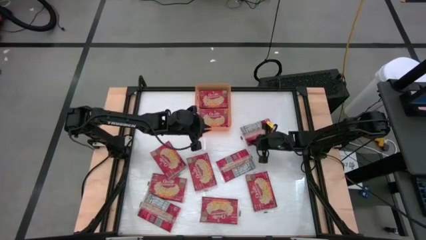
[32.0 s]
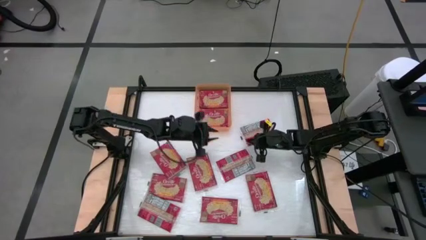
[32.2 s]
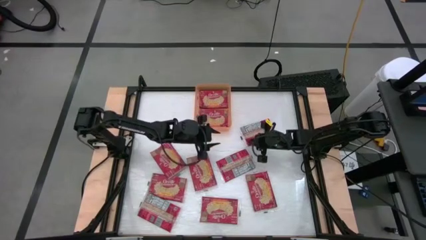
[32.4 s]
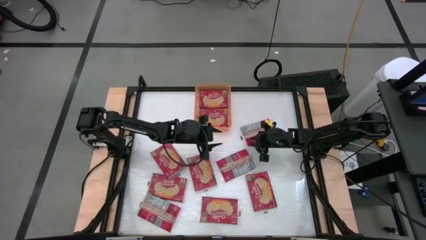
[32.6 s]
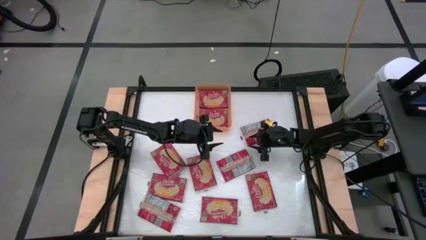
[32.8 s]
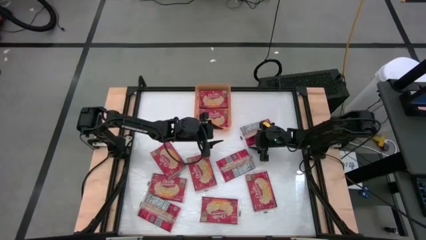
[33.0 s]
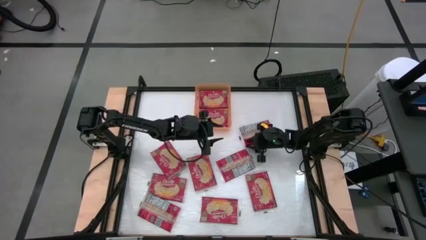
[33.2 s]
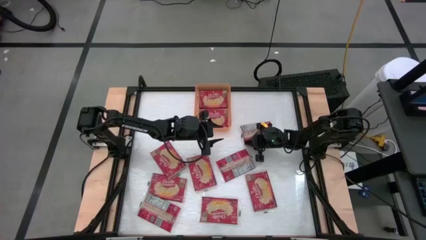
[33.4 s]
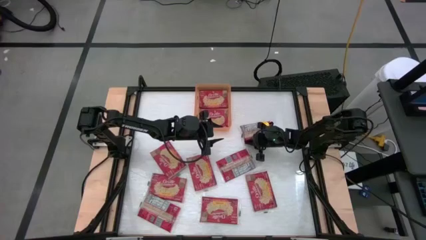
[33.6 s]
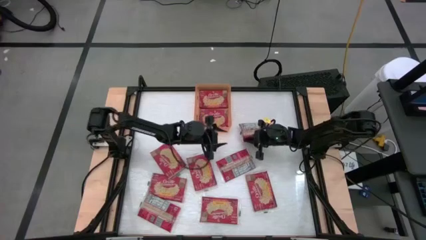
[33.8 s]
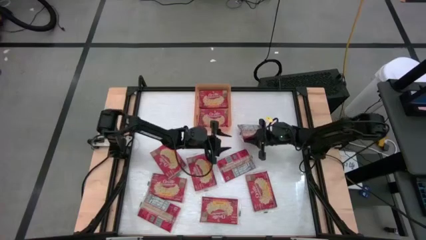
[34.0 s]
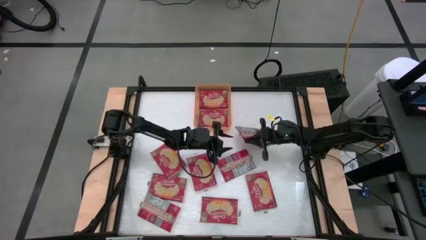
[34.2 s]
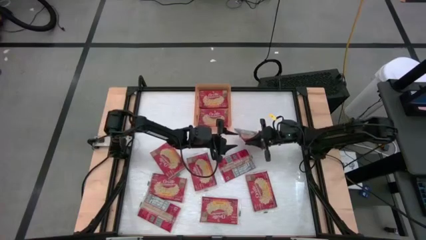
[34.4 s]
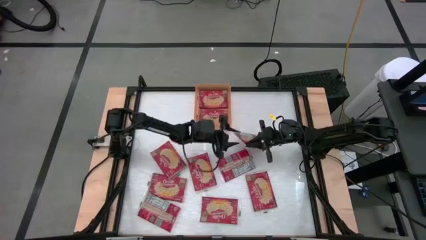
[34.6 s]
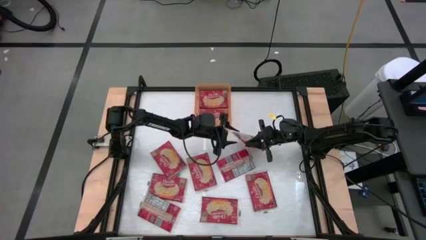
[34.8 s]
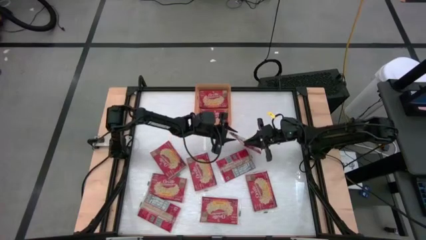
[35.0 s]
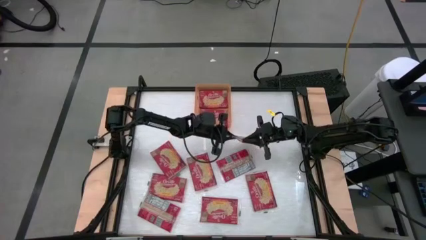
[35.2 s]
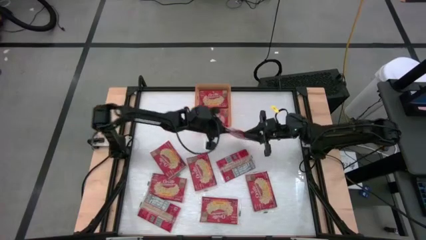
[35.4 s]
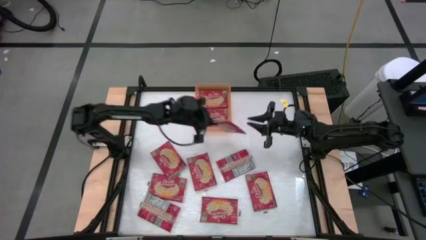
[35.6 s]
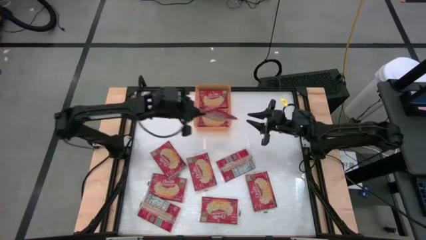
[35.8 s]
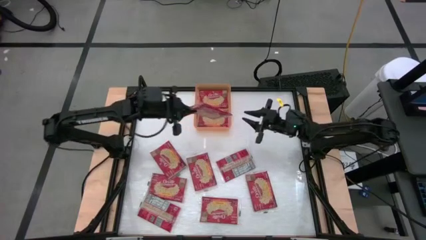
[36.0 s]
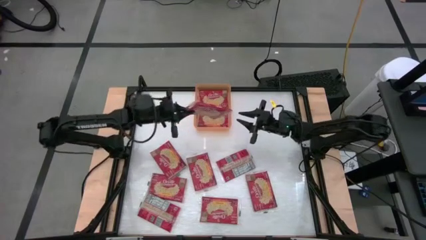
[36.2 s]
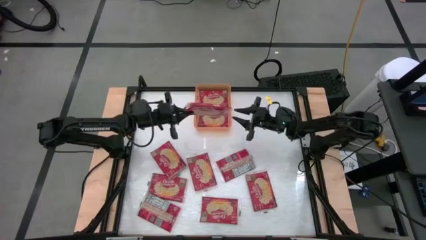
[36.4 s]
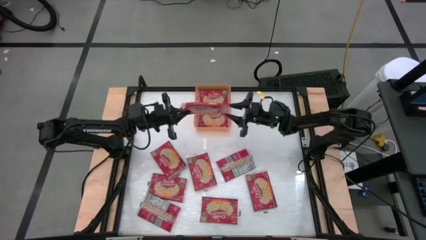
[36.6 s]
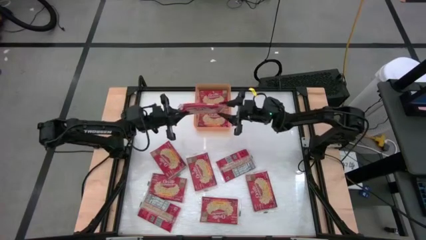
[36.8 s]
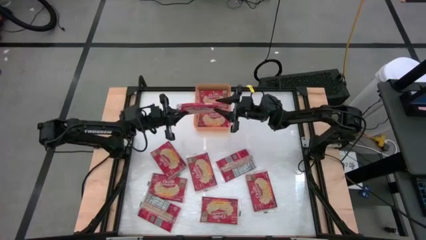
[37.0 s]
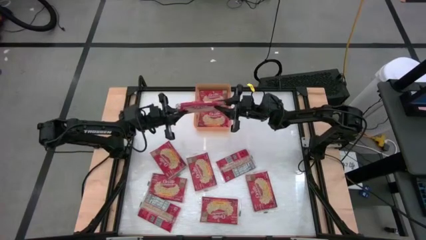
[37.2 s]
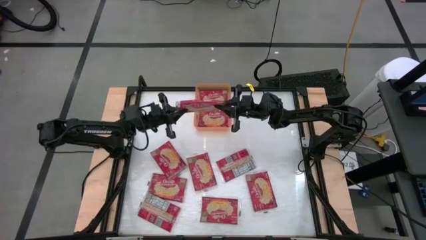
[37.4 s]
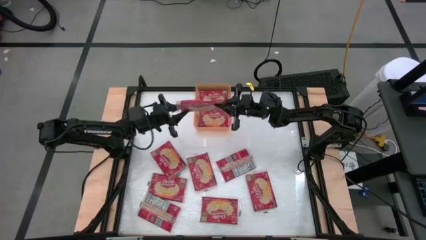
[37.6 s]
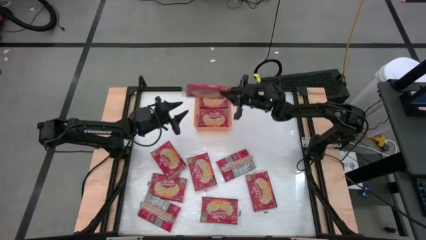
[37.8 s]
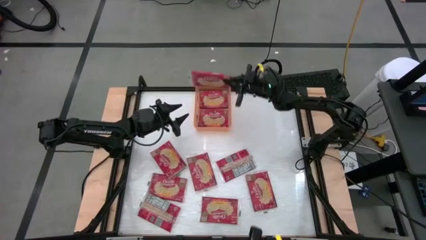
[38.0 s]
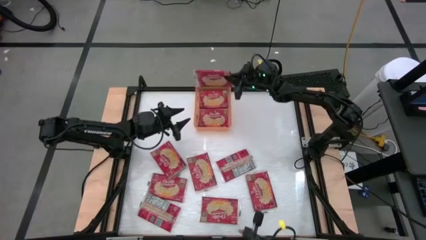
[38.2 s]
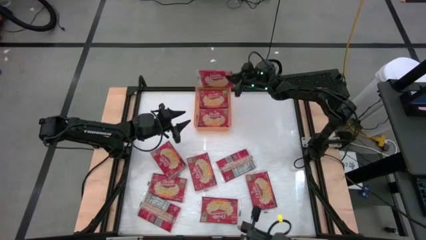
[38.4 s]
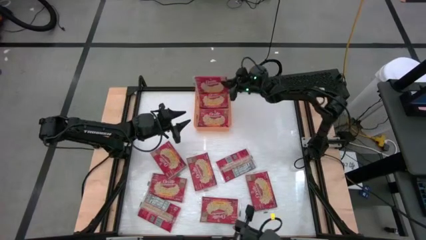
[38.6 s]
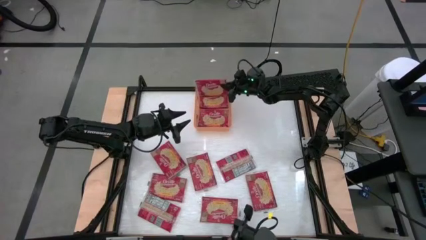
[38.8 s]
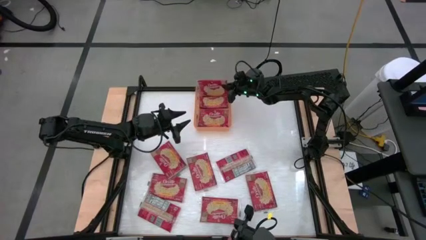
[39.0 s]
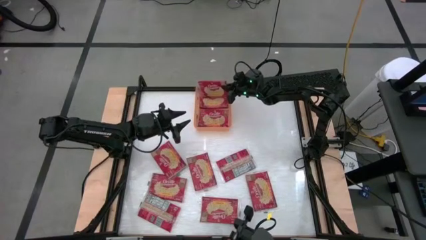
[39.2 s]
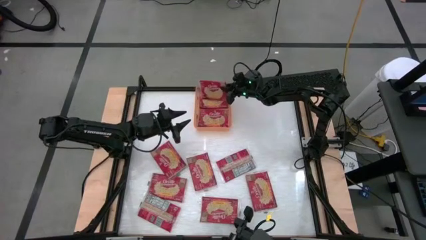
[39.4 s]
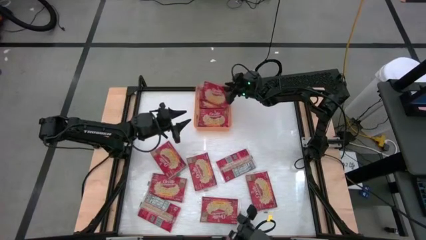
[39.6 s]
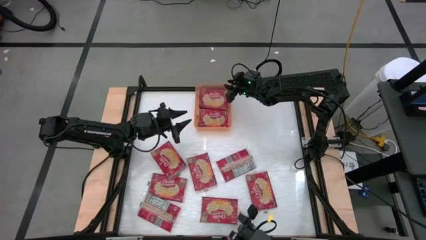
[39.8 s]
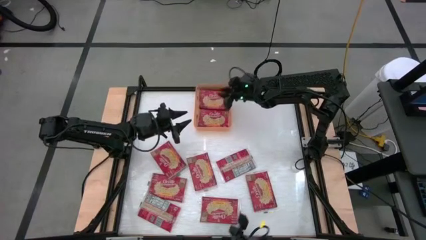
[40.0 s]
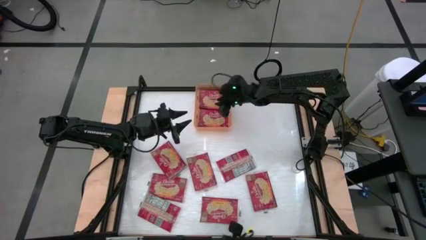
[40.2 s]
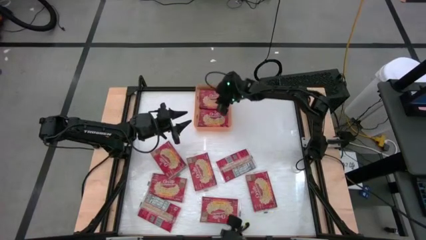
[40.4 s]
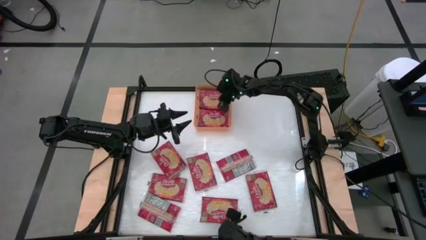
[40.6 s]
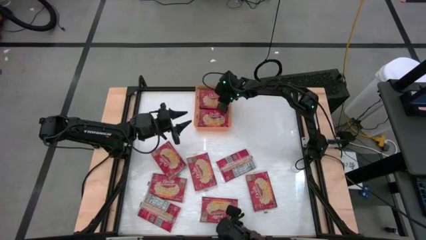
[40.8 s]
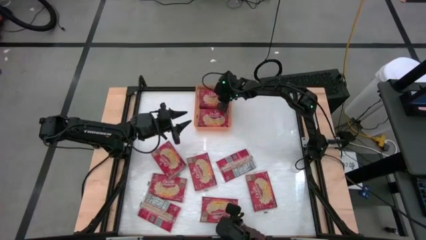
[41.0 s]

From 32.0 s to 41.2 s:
Task: Sort popcorn bags into baskets
Put the red popcorn bag into the orange bin

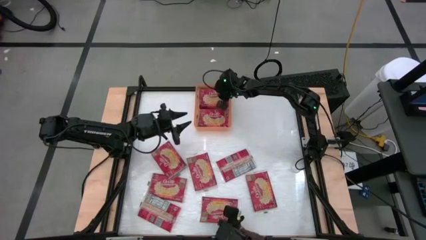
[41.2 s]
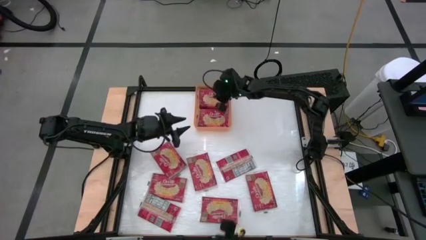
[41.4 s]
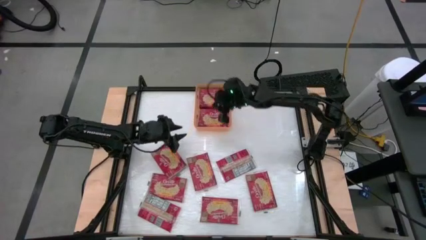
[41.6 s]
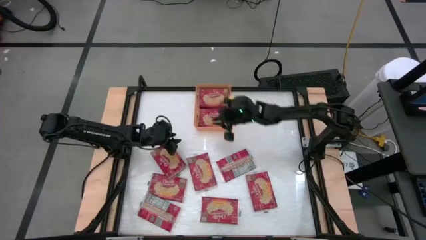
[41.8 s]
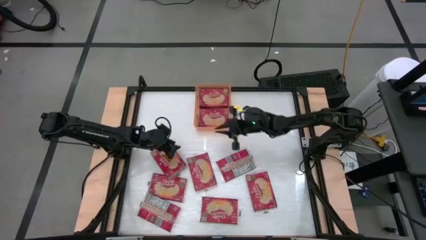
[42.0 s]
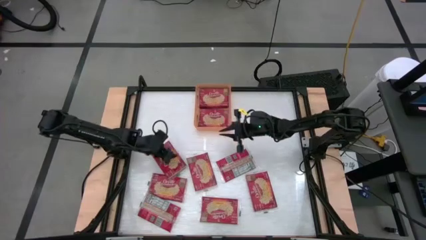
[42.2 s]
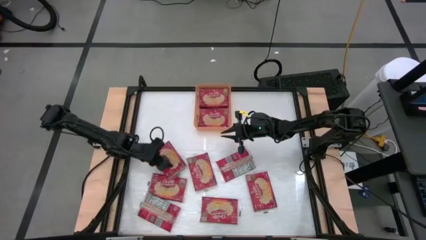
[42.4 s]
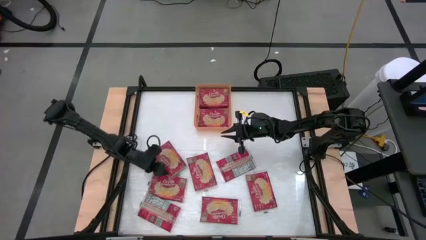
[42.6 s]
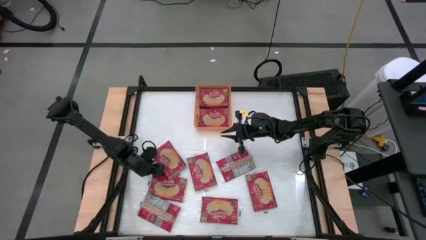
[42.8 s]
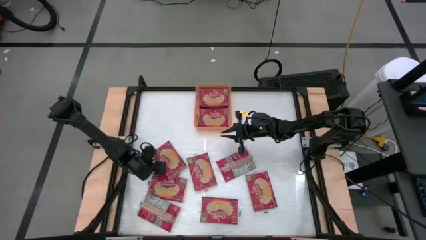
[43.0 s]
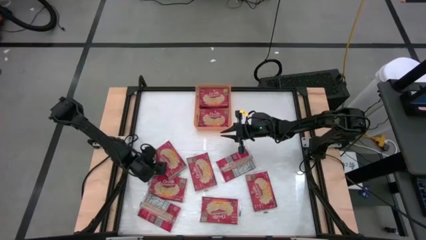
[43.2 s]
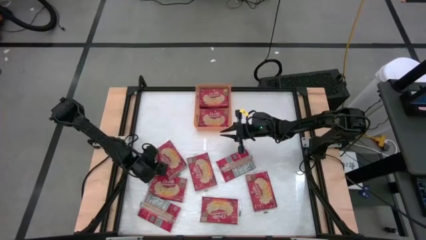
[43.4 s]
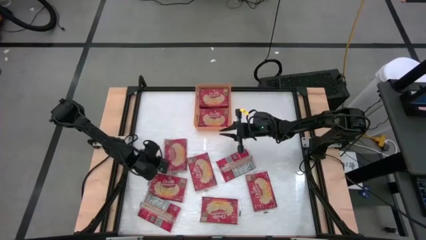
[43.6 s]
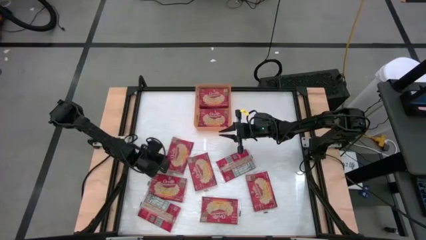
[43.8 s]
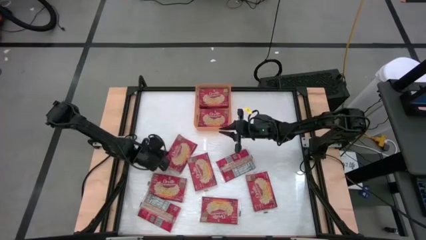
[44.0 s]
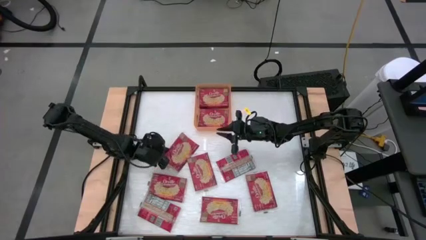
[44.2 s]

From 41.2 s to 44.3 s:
Put the red popcorn bag into the orange bin

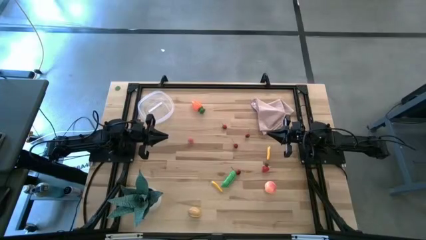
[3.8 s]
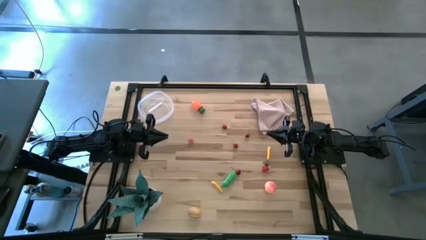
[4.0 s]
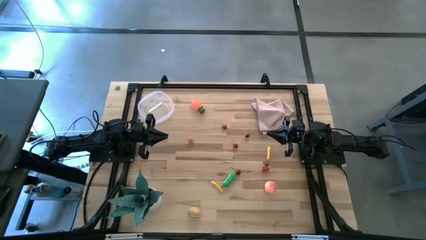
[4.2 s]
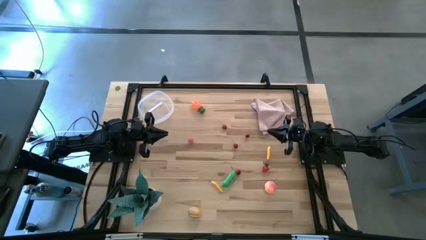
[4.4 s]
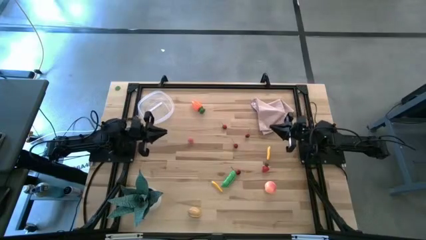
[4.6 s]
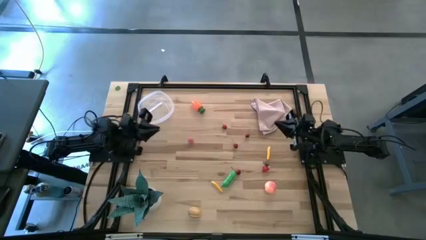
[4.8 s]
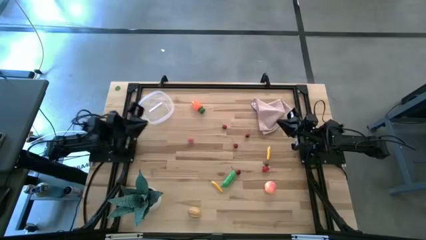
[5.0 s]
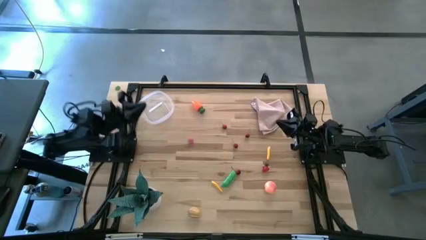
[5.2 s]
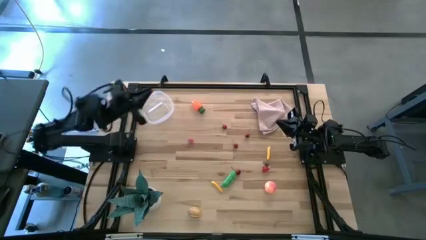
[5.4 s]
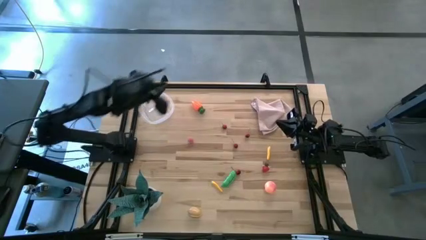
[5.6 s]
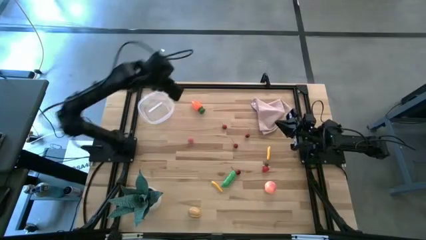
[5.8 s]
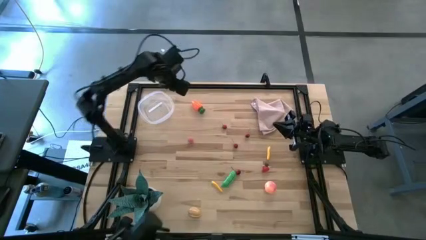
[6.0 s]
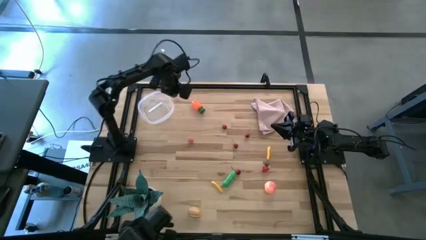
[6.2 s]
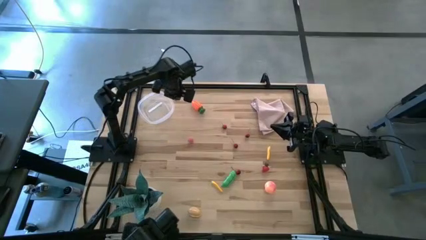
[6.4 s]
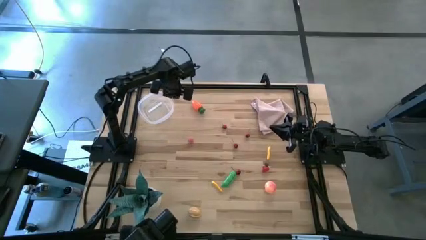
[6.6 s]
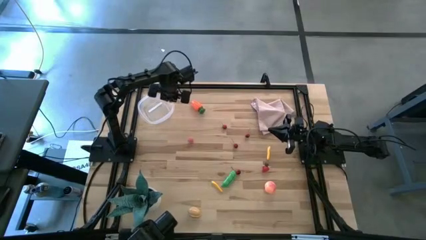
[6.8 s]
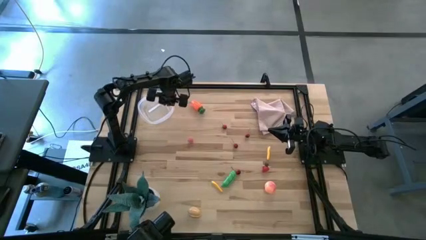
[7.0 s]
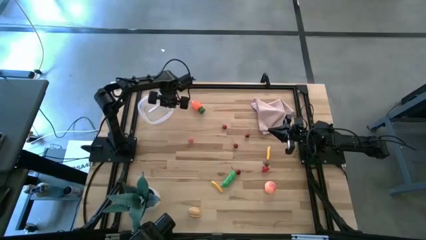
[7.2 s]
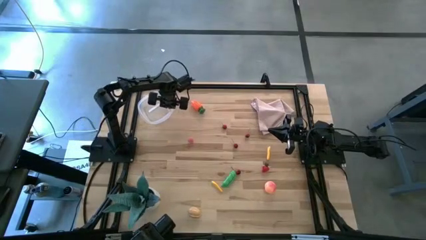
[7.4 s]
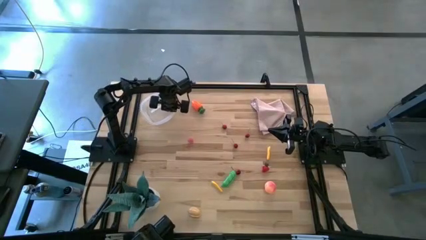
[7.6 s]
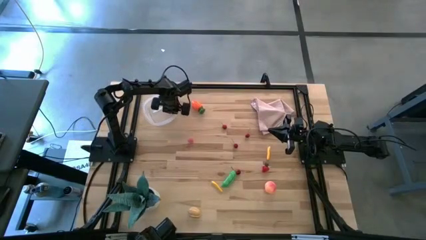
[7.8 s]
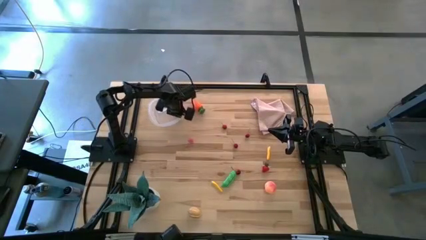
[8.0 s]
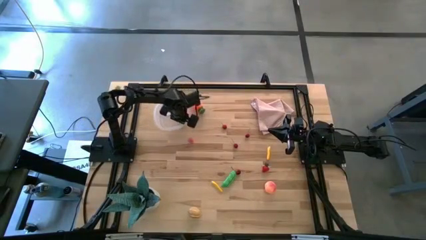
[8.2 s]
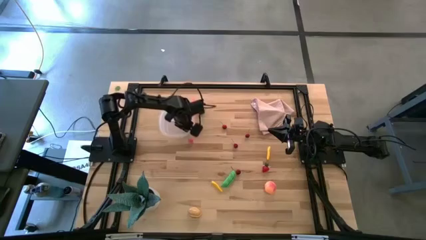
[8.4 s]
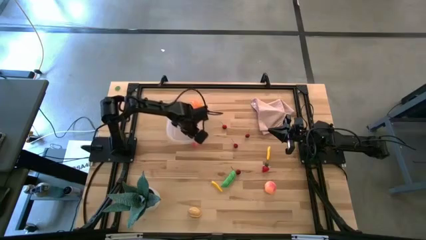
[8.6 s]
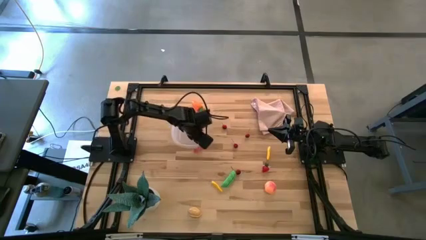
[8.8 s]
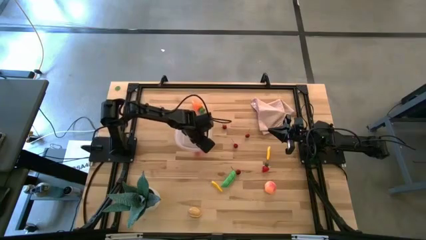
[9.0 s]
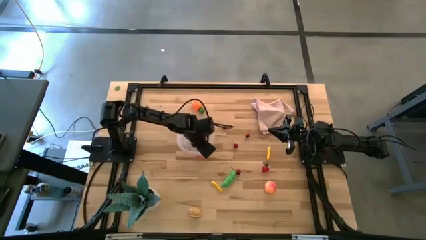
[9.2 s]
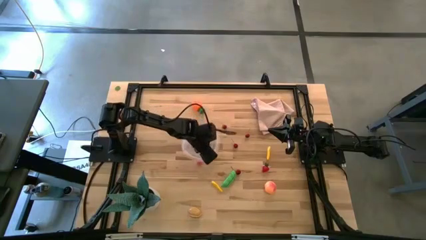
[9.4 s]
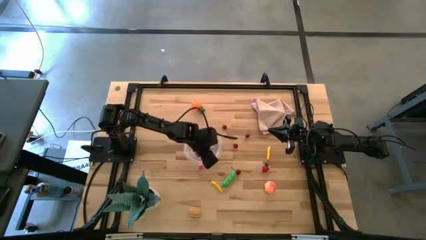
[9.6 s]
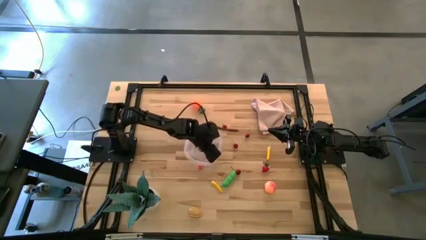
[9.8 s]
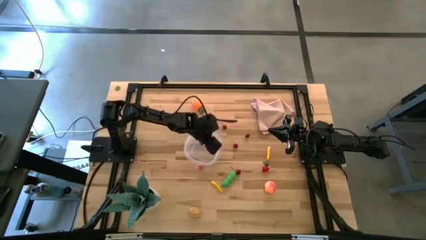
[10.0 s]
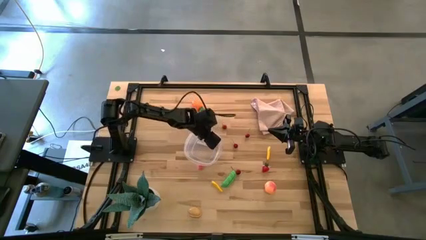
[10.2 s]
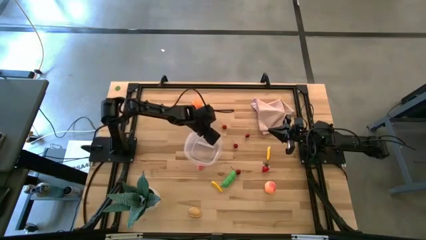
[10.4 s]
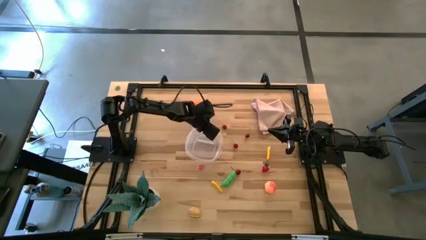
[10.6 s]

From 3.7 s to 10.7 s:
Task: Pick and placing Produce into tupperware
Move the transparent bin to the middle of the table
